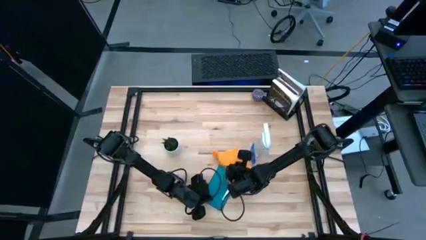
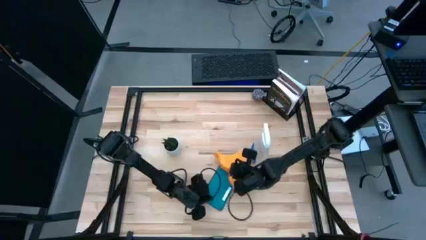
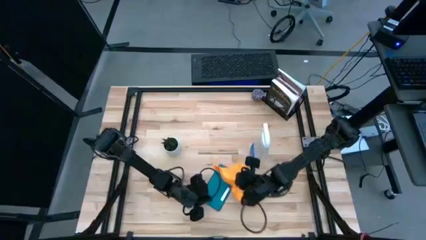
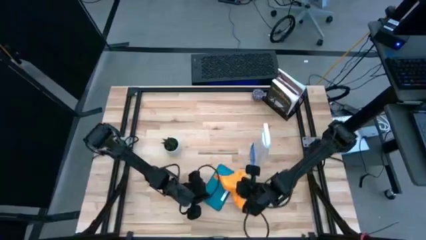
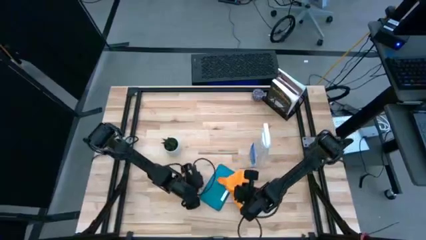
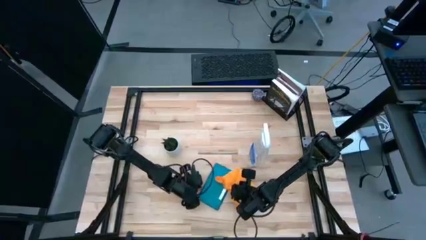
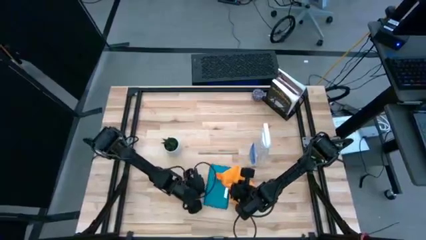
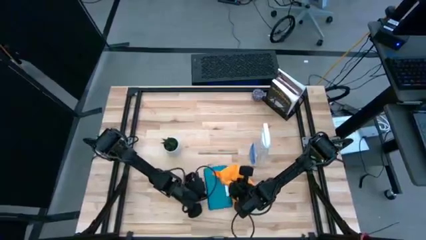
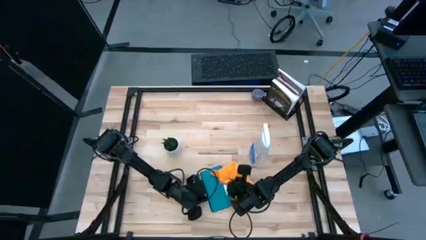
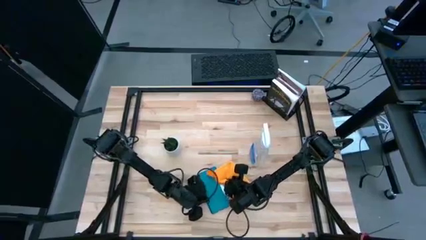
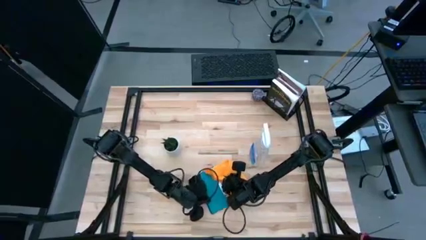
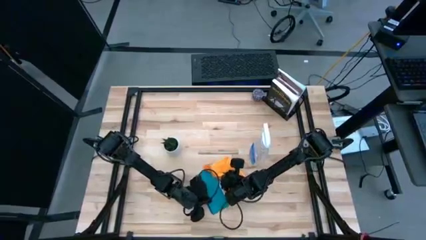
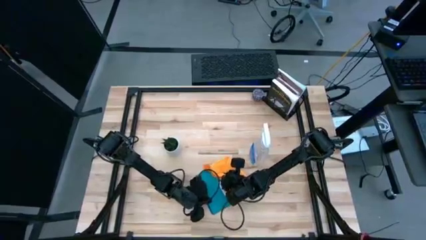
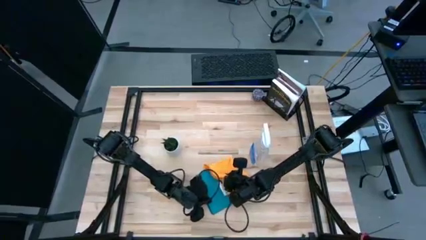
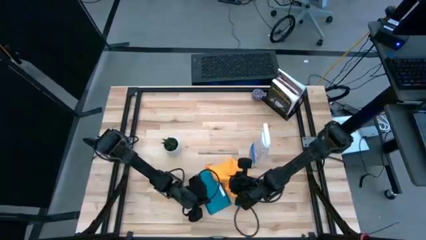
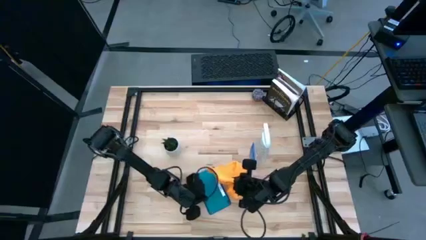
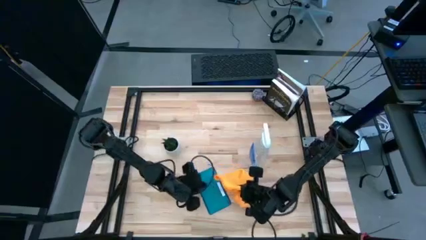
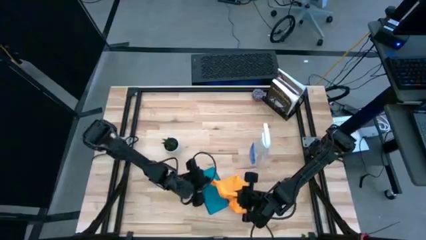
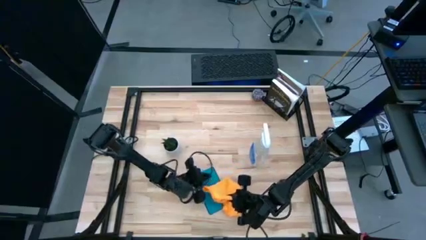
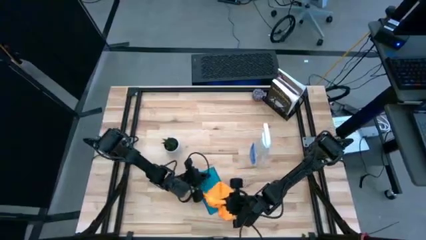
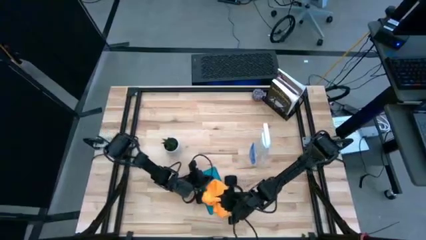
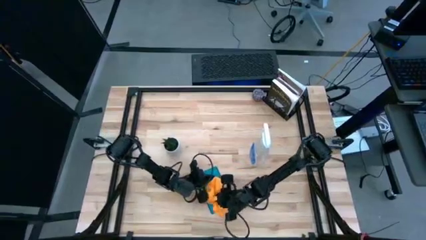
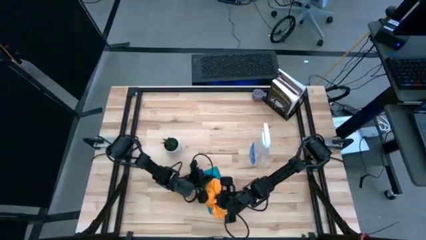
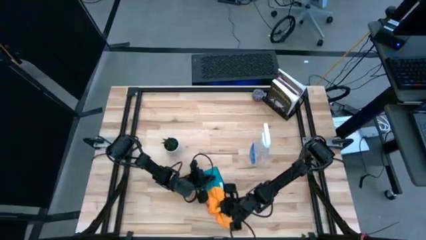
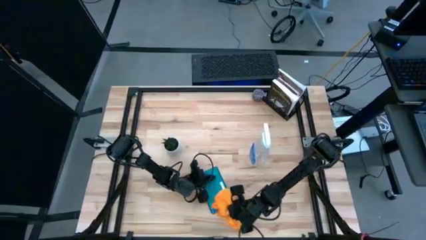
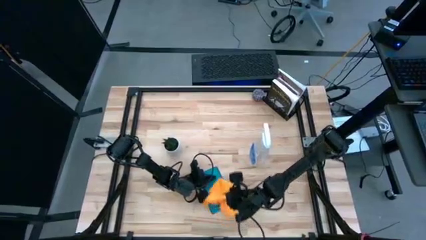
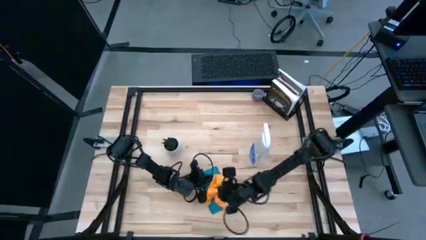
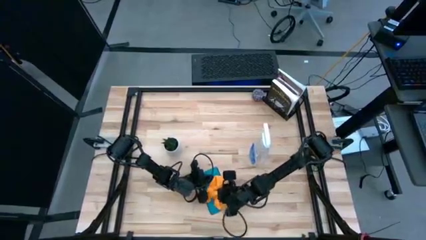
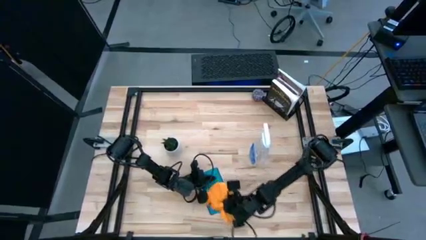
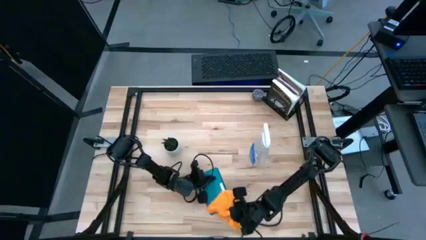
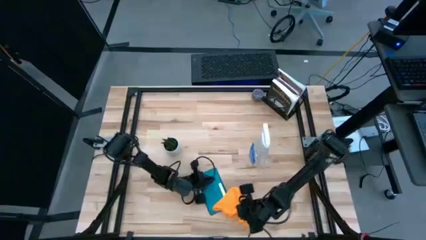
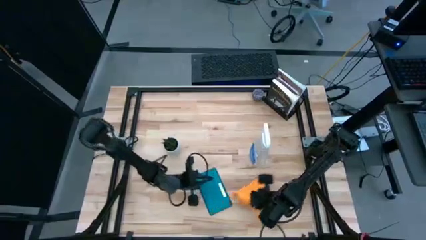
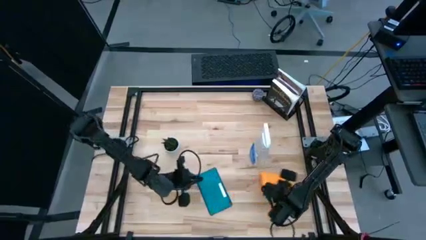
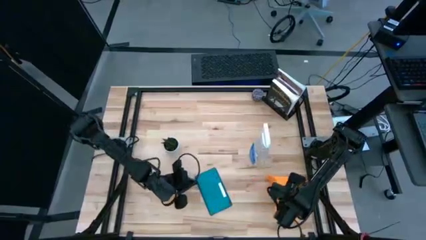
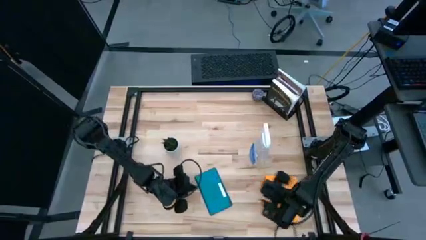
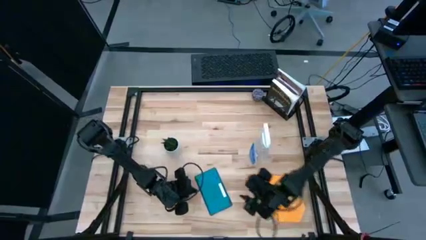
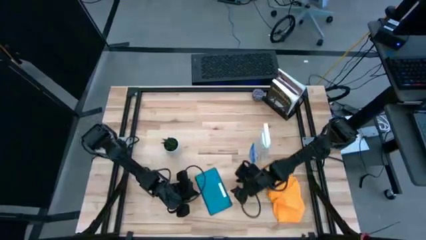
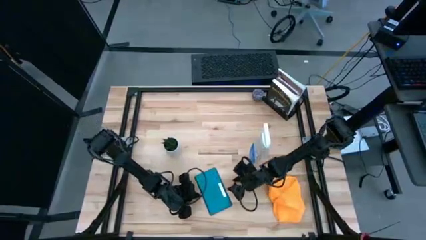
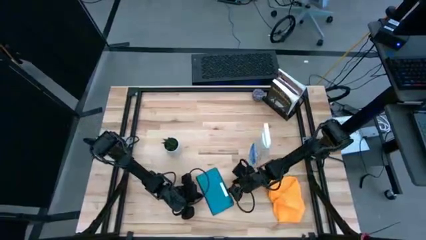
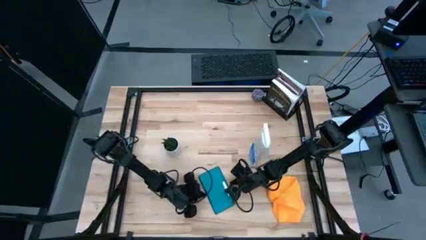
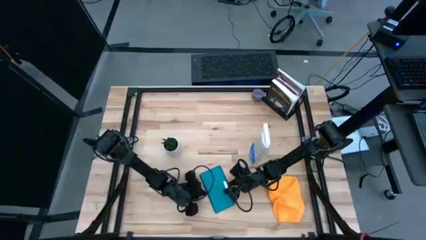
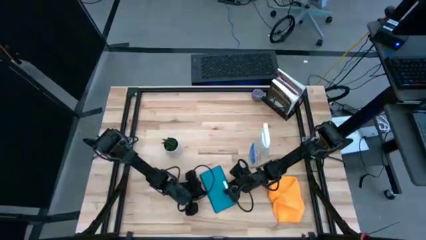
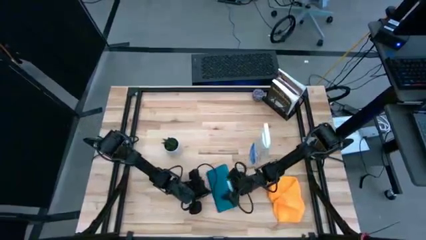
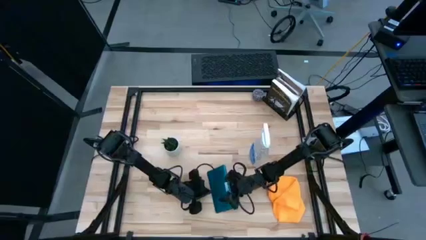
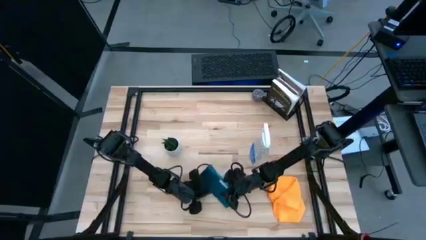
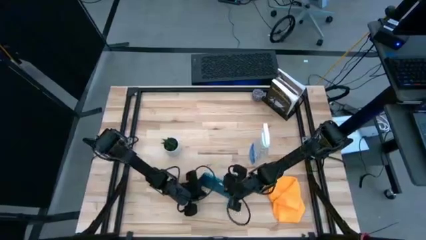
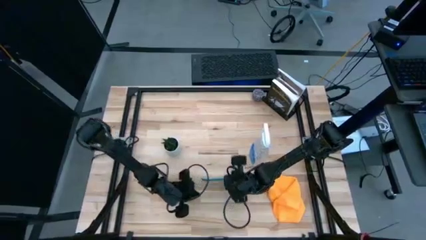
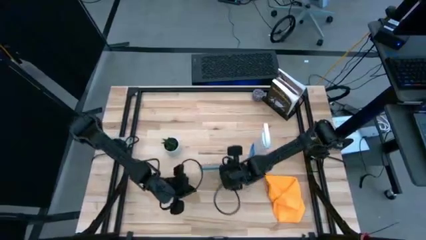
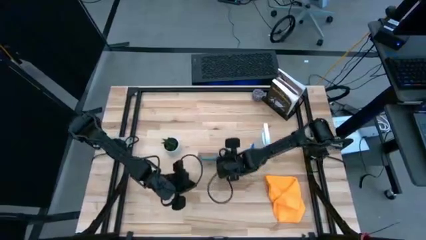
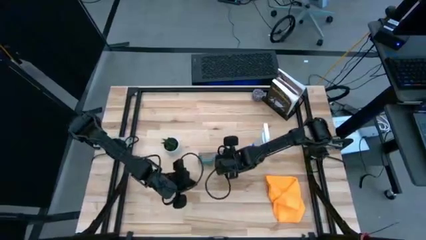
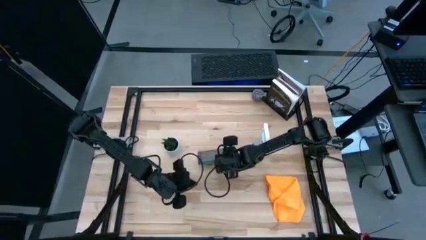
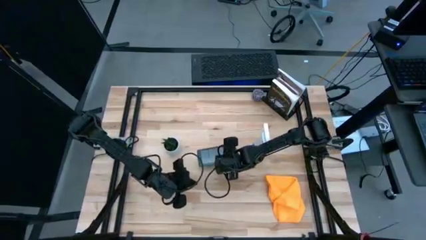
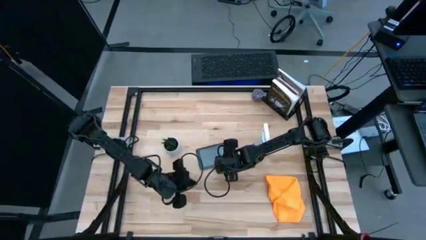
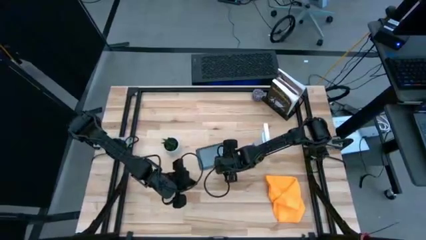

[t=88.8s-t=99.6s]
Task: Apply microfiber cloth
Wipe the tablet with the microfiber cloth

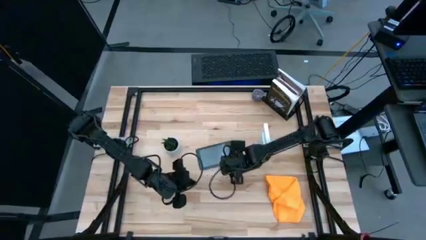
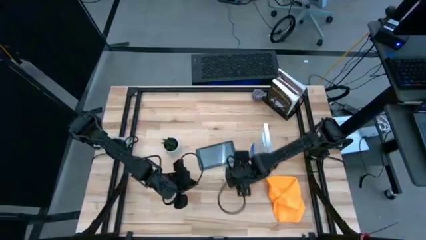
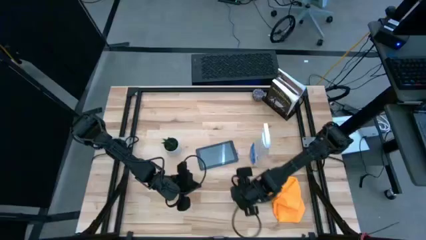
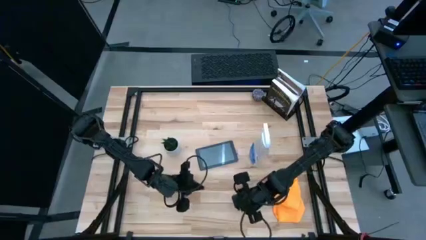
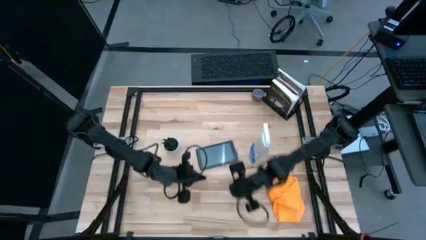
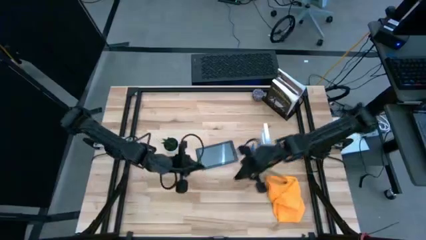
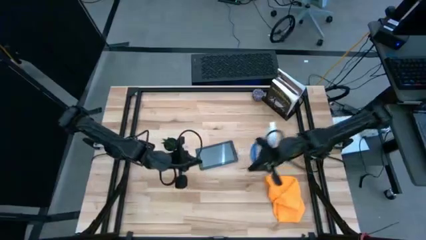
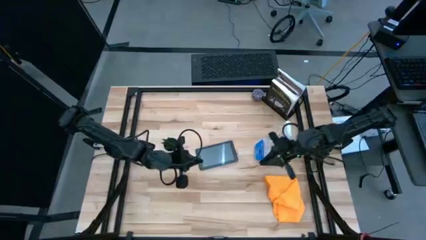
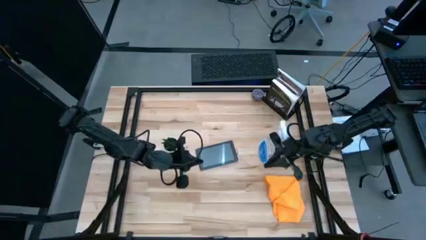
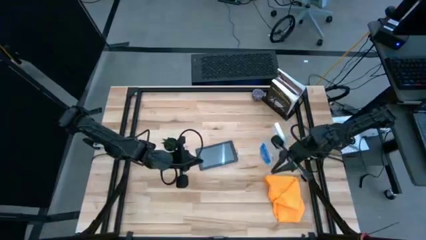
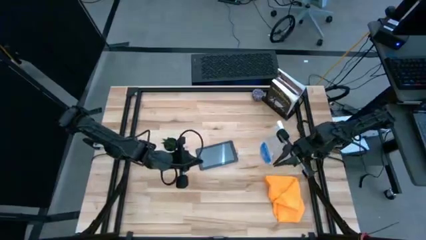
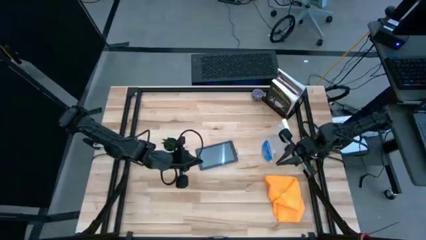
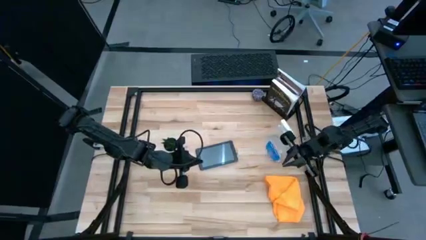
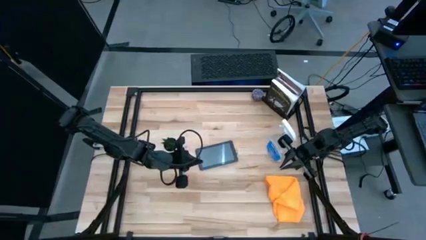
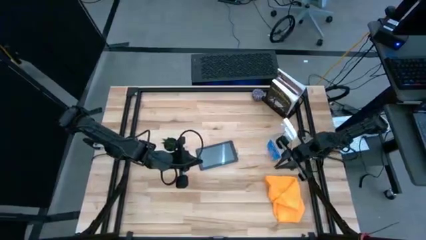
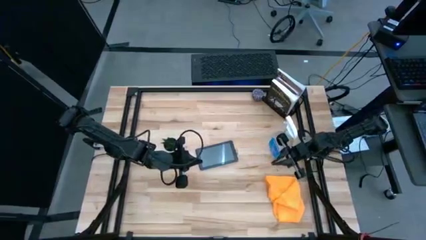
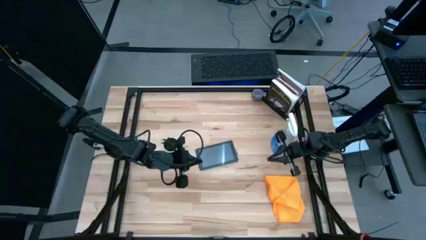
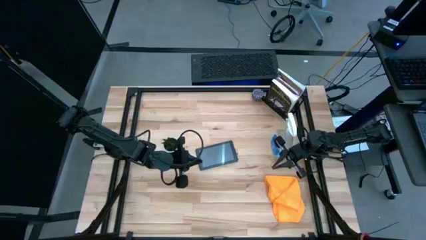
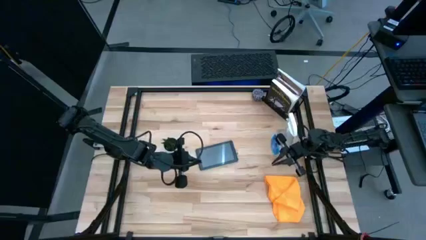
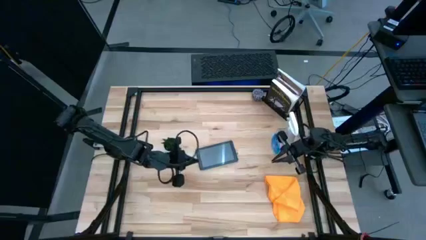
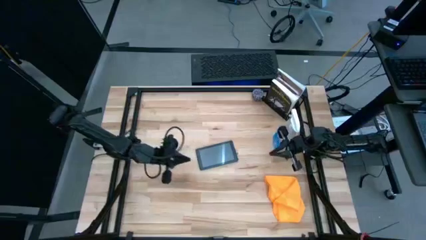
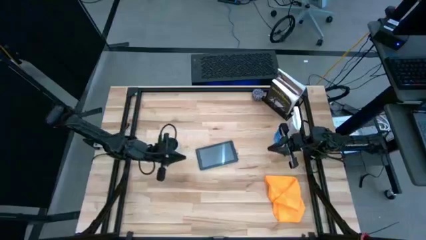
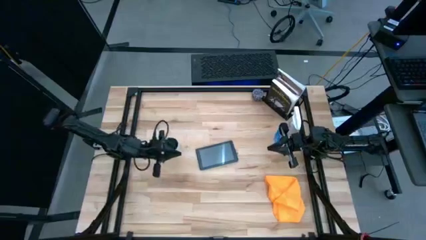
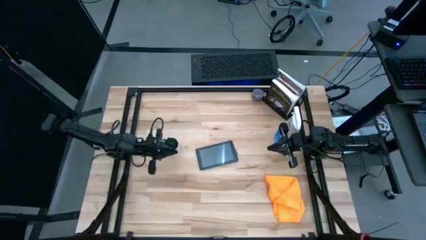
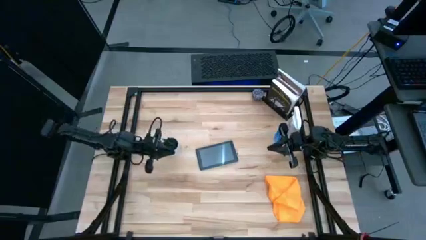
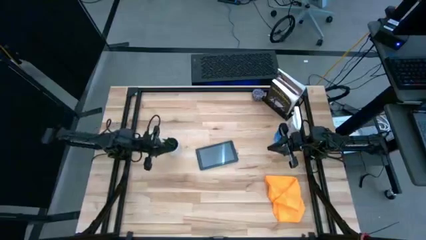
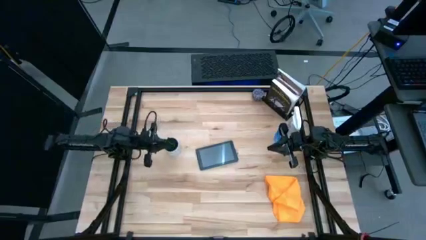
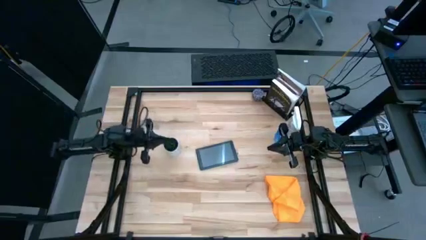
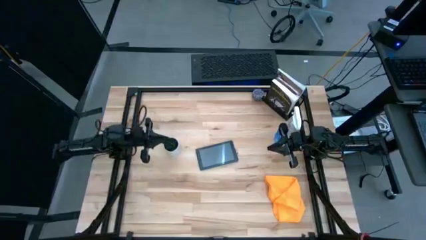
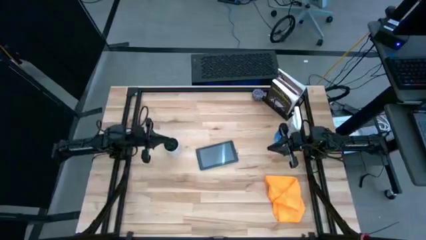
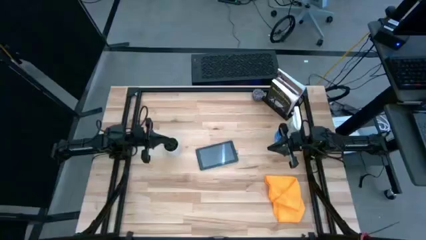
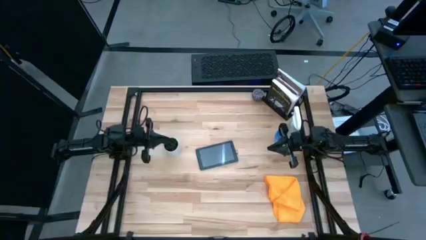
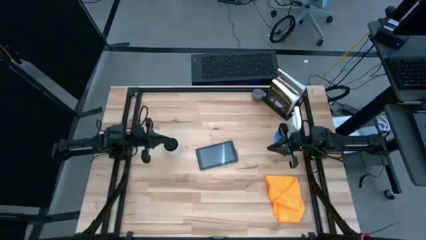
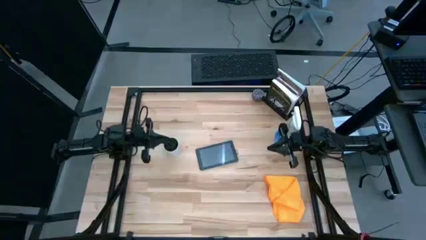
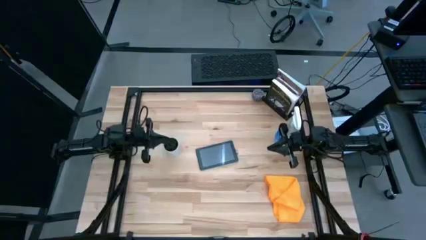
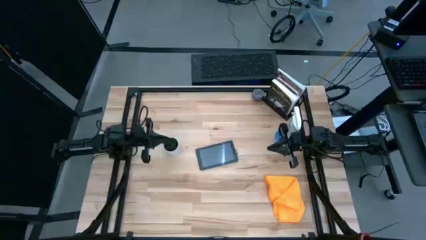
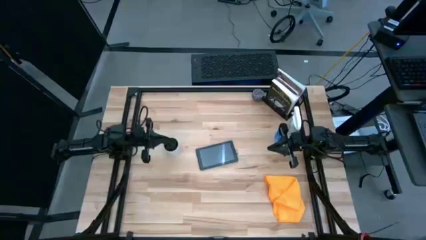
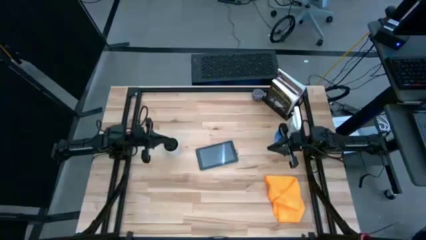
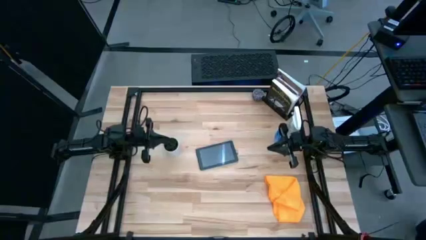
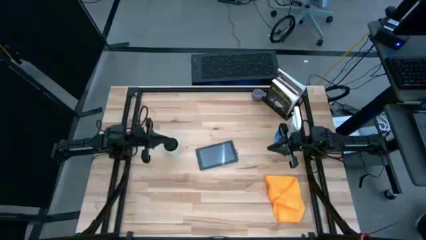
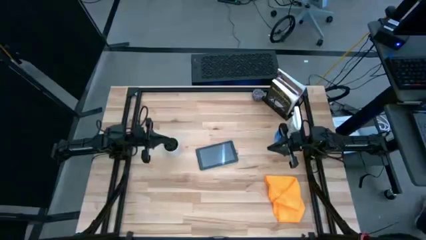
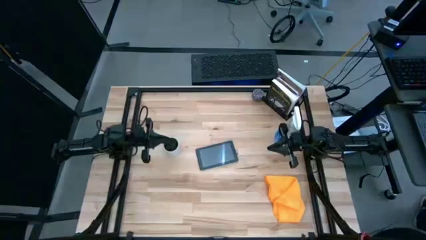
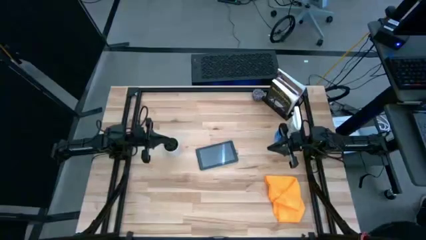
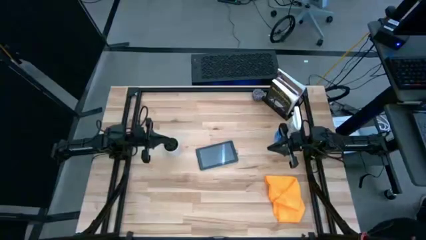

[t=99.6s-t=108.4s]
Return to Home Position
